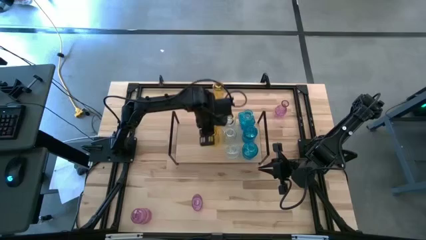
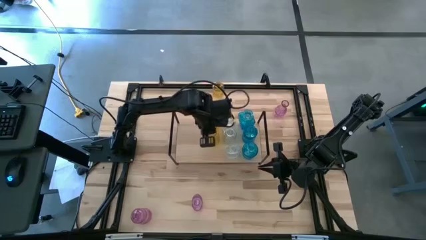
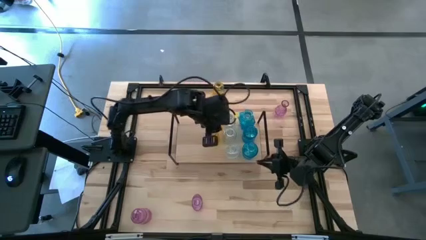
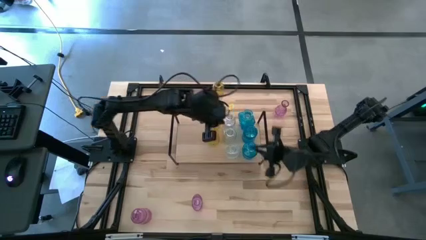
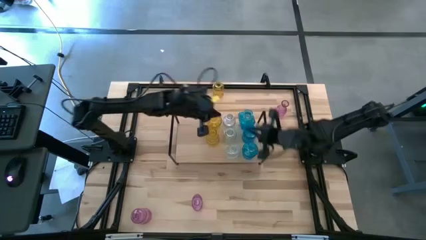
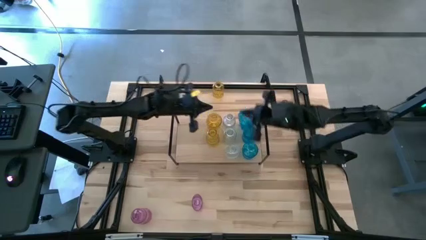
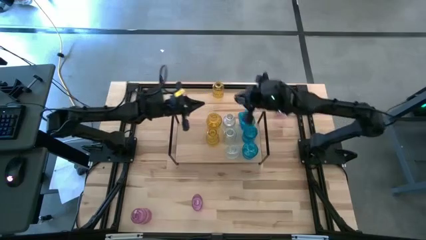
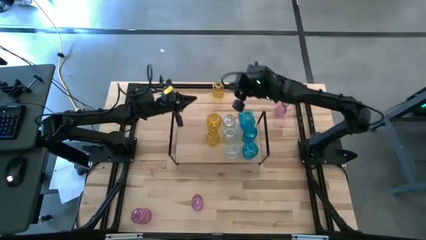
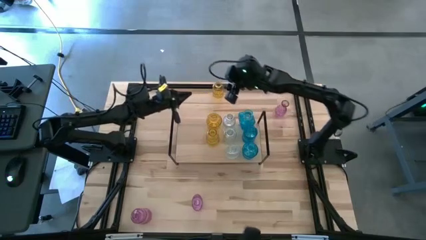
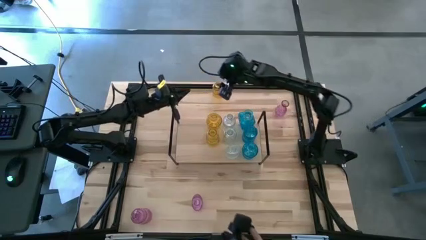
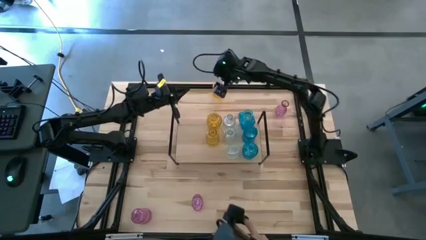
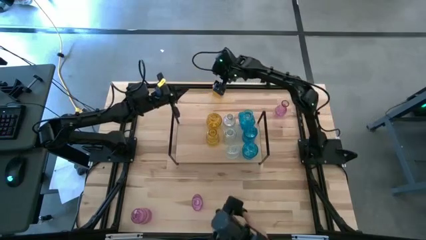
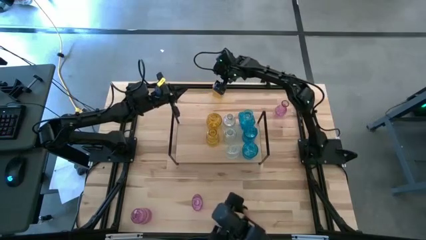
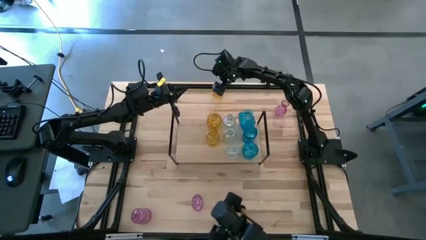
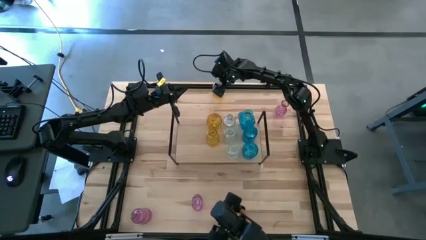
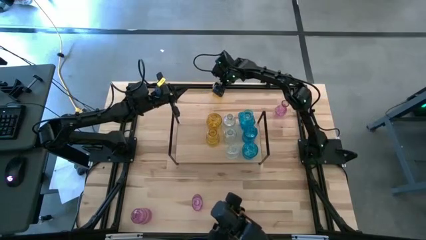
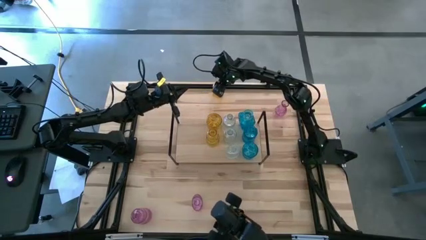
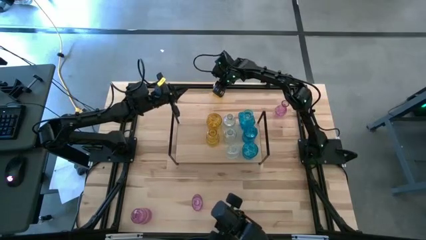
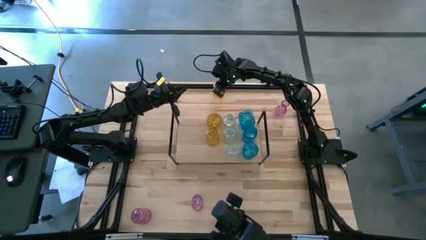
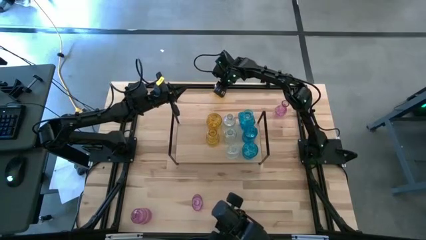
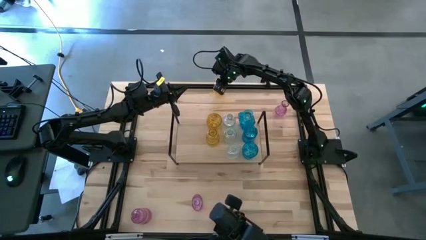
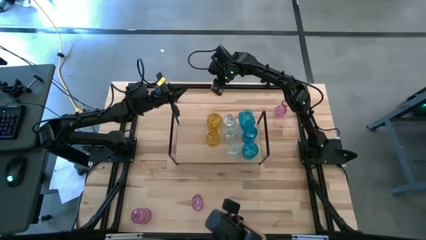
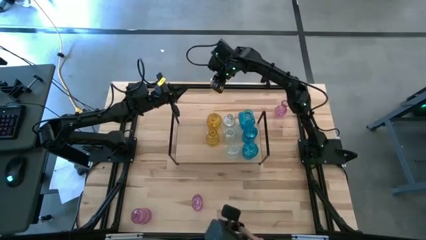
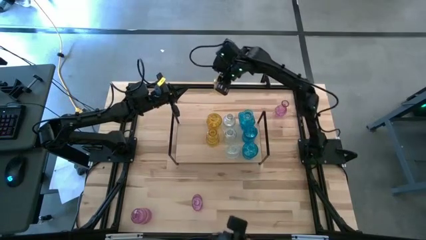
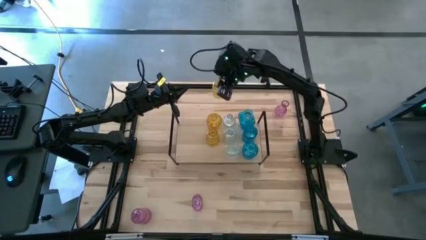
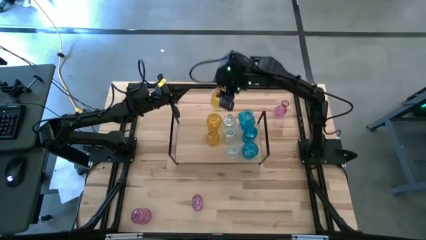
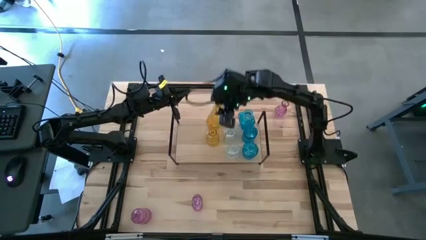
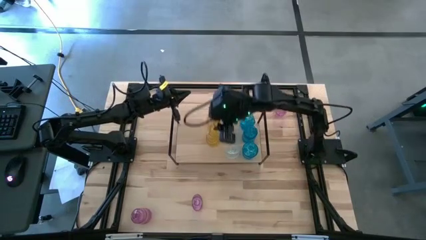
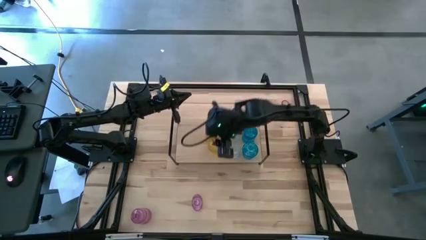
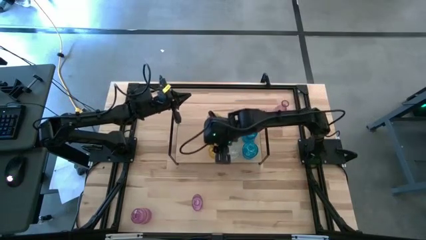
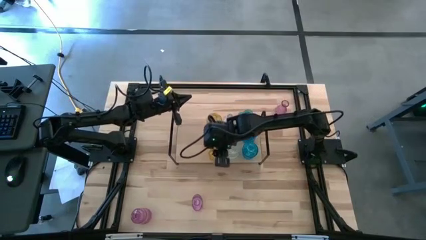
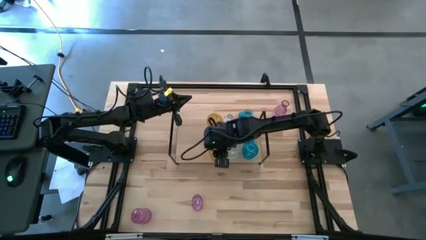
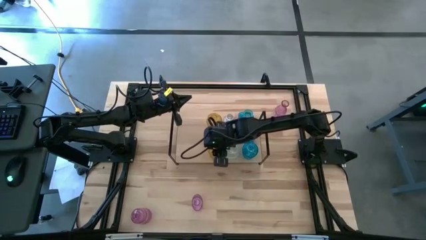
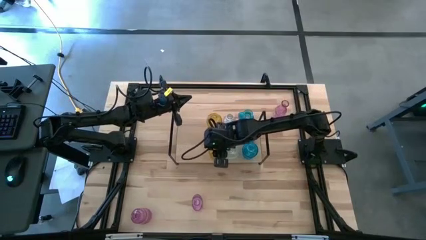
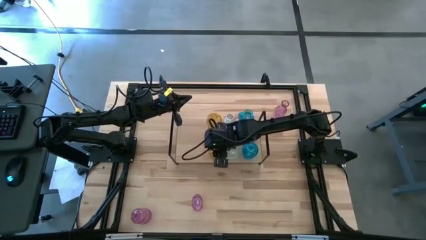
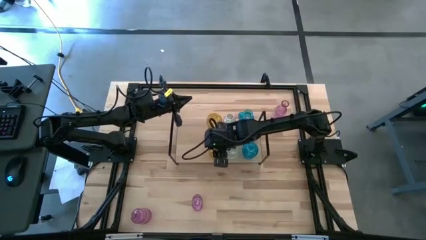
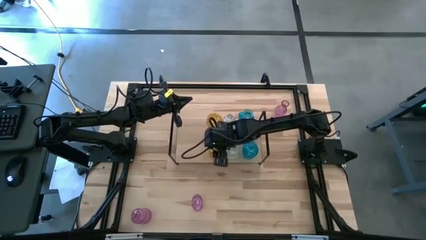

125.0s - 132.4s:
Task: sort vases onto shelf
Put the yellow vase aligned with the other yellow vases on the shelf

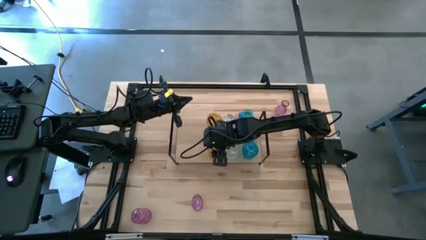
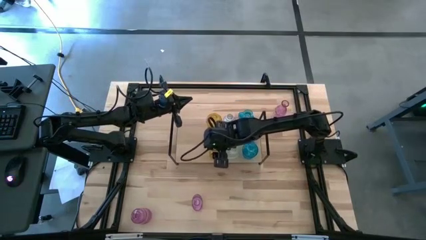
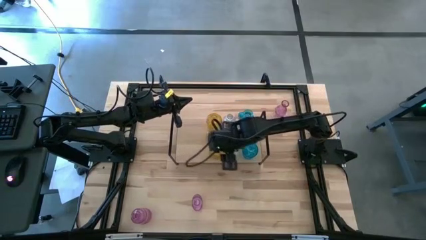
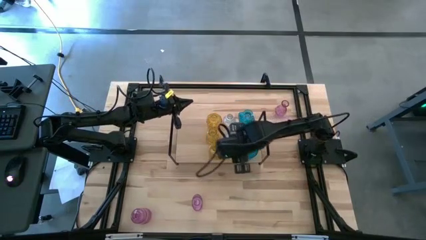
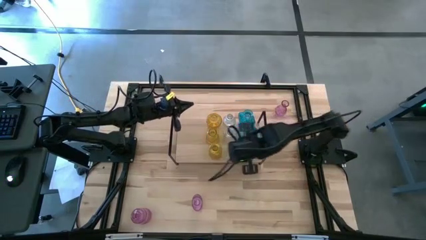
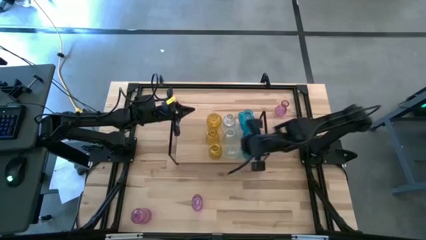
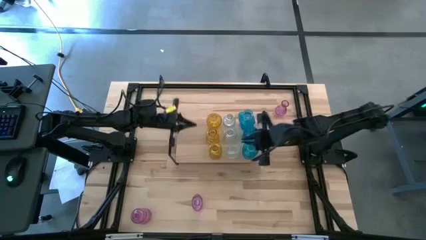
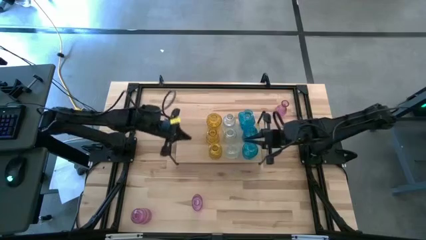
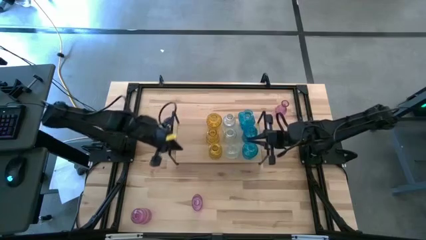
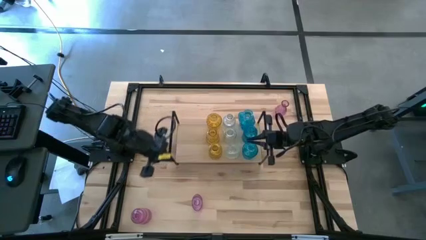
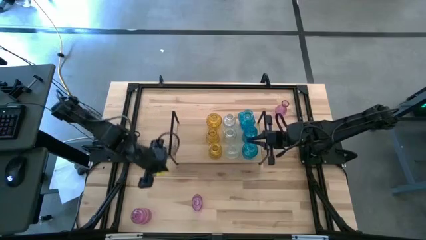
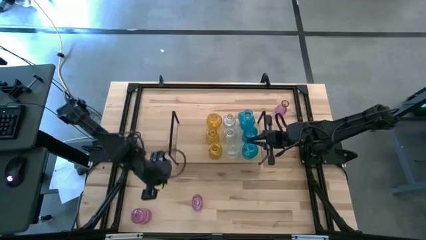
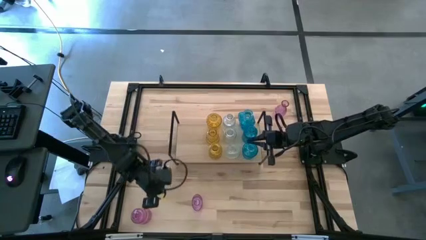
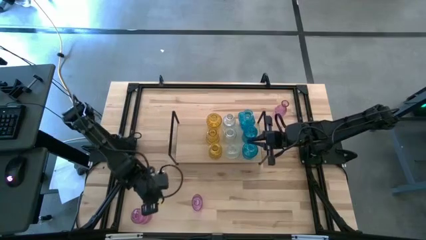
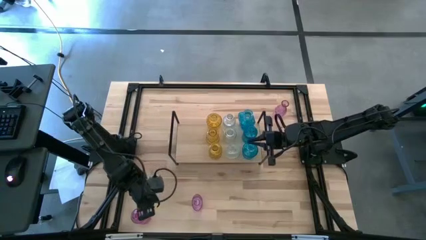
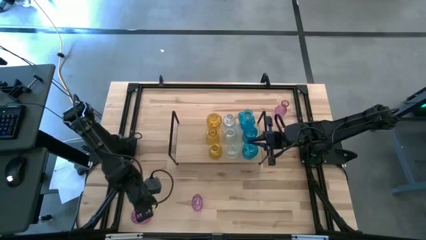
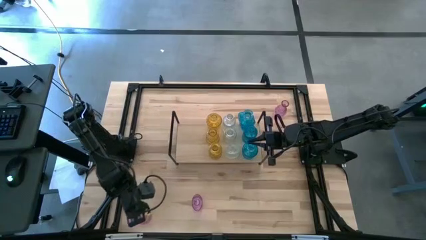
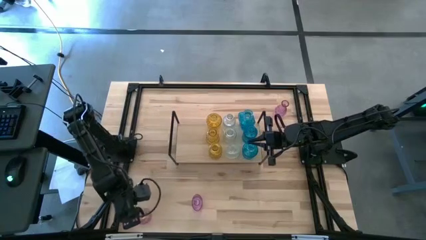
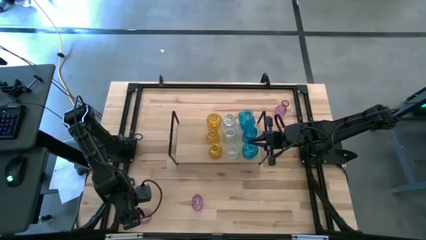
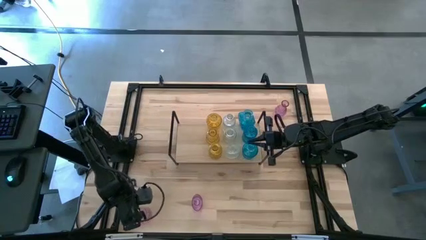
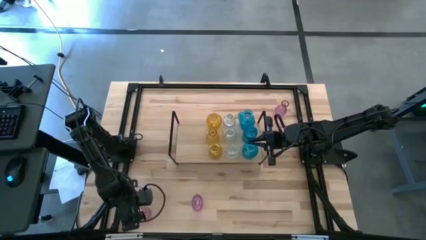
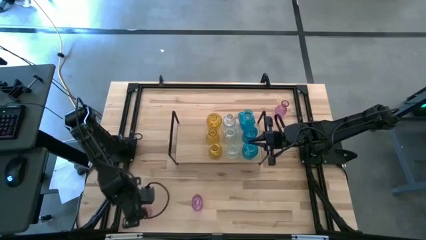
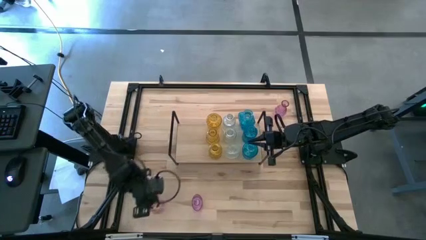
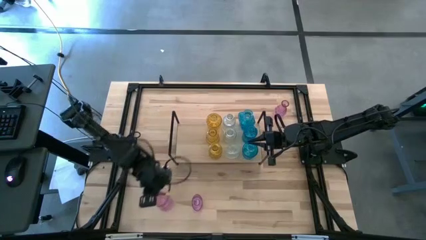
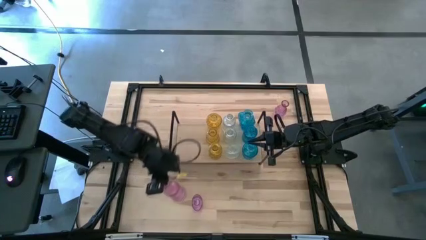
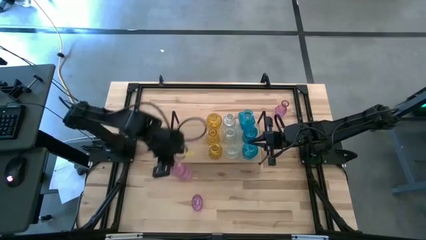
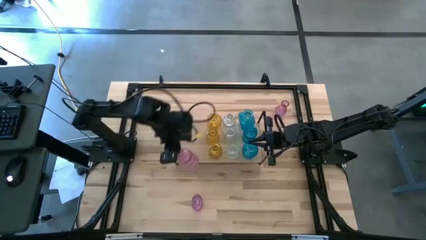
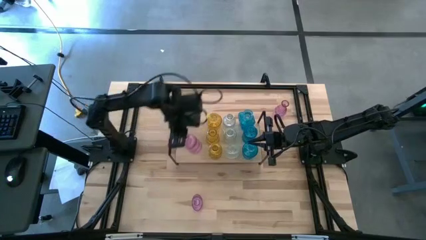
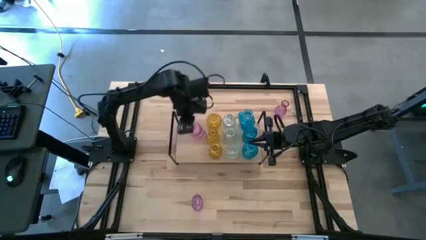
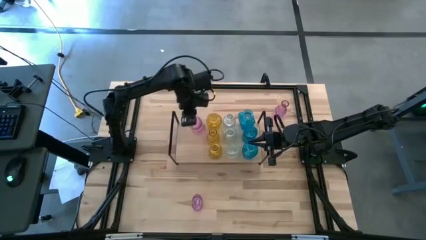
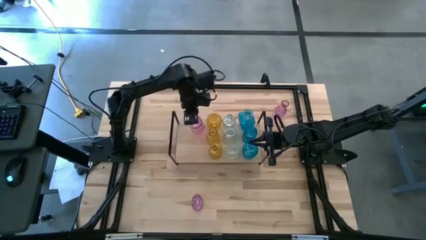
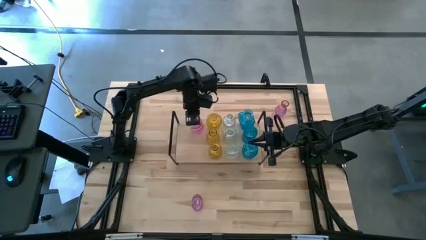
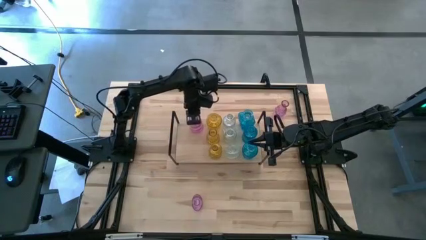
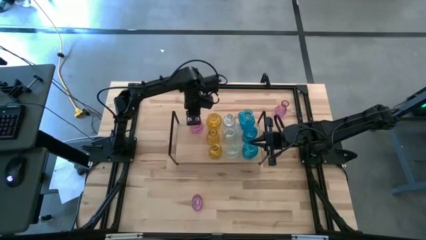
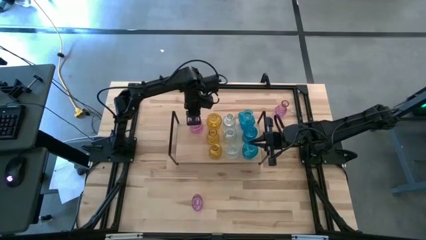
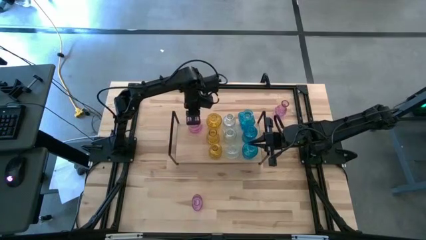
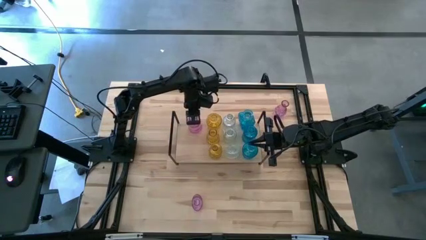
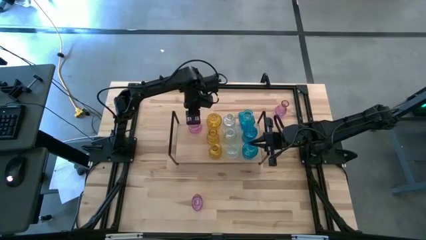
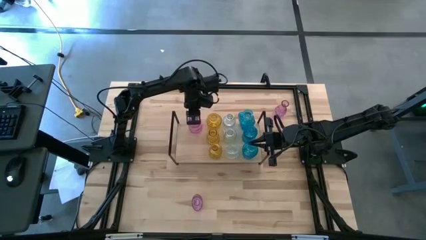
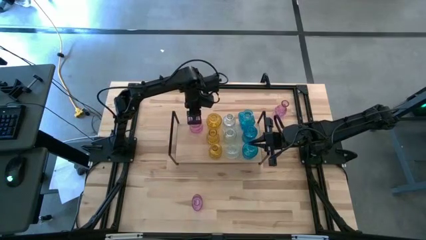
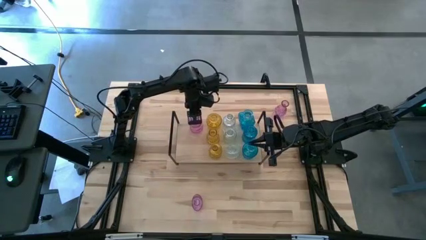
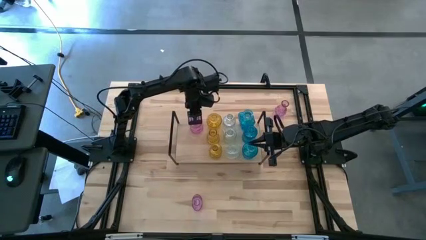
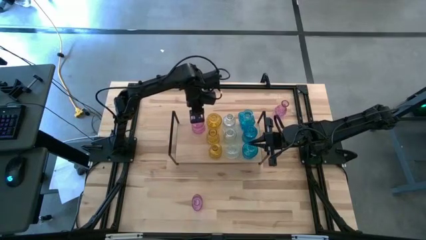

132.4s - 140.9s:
Put the bottom left purple vase on the shelf
